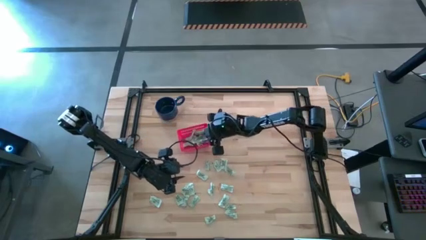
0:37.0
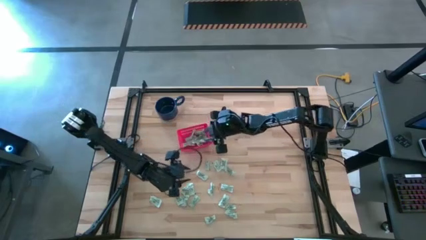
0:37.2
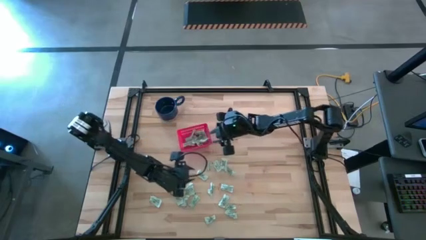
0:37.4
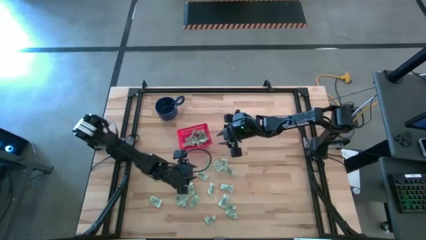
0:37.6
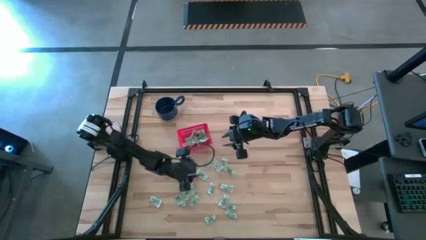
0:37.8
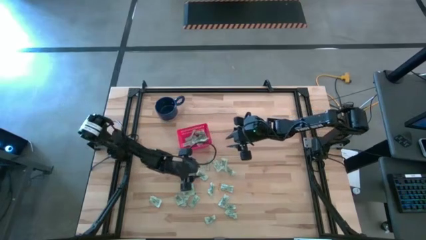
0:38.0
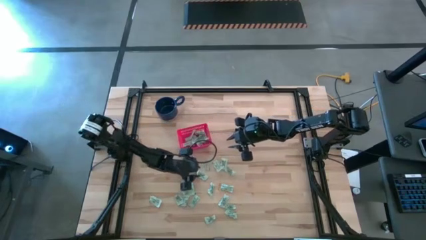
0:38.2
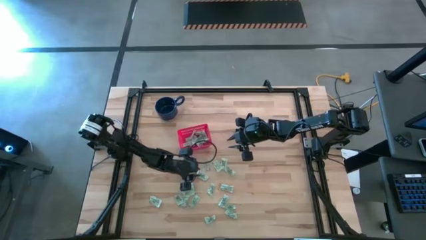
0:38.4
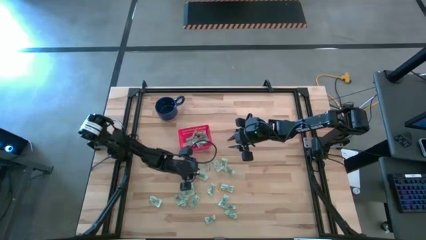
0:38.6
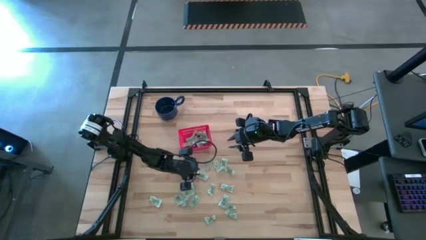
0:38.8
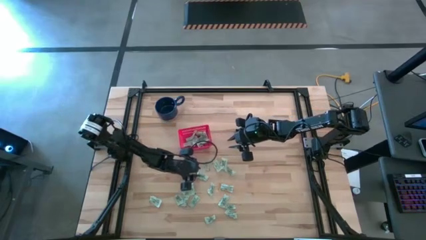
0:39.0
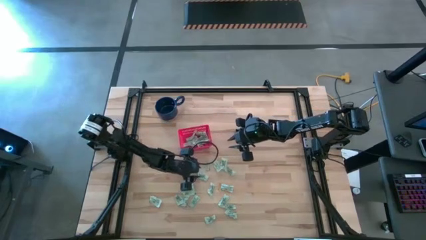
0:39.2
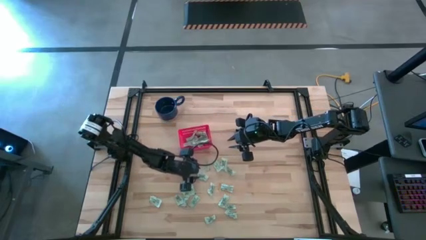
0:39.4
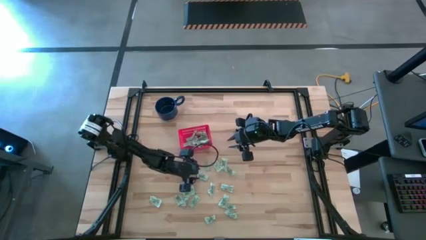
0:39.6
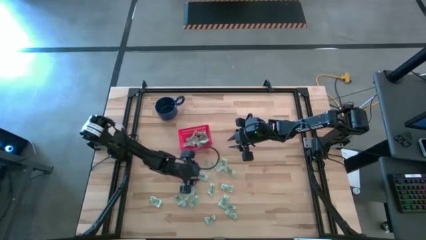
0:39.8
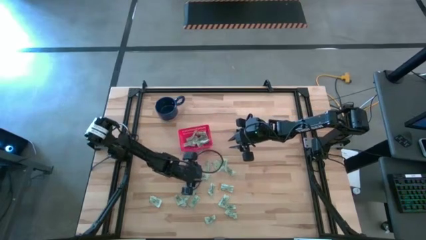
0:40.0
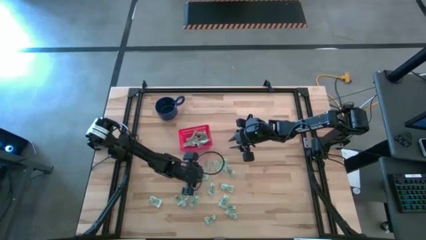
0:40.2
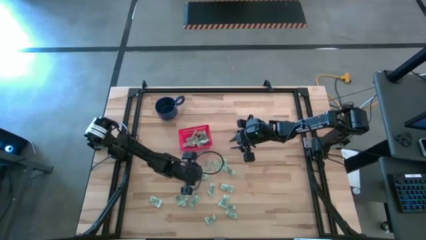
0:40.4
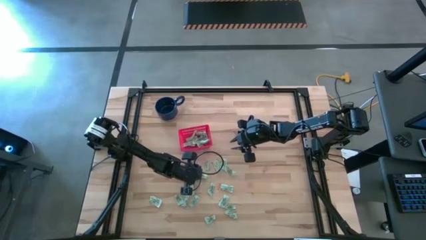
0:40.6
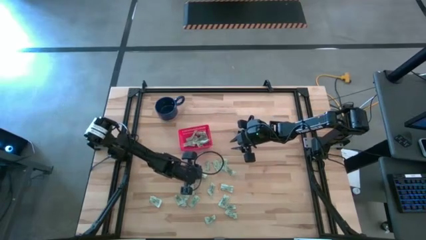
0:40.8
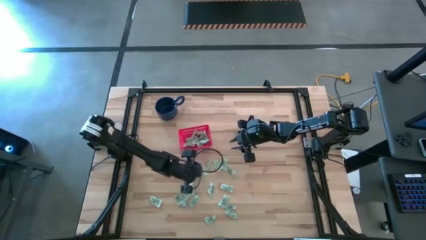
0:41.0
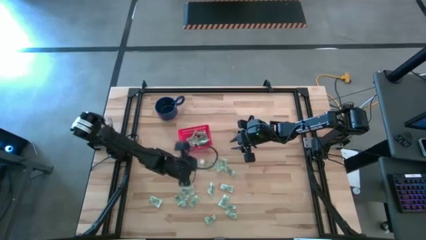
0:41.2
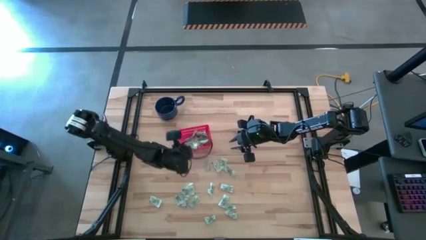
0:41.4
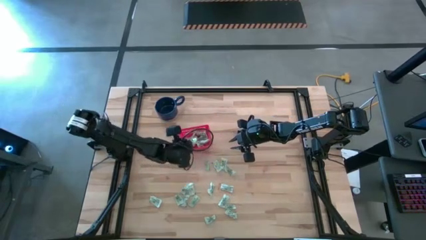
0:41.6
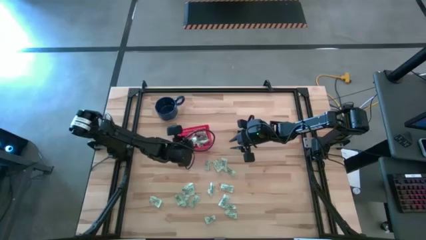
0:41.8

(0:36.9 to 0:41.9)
Task: Pick and place items into bin
Put the green stevia packet into the red bin

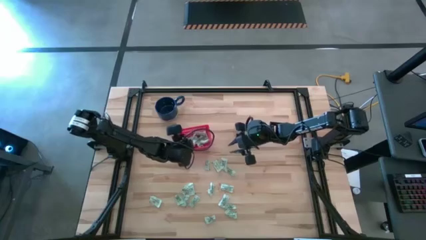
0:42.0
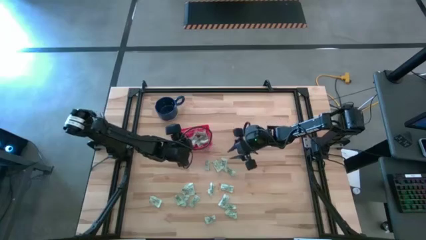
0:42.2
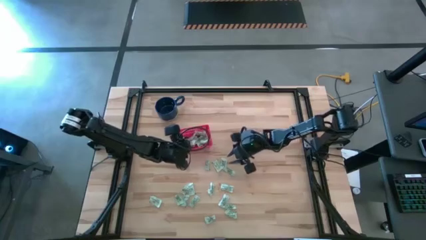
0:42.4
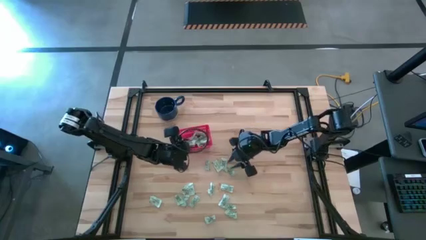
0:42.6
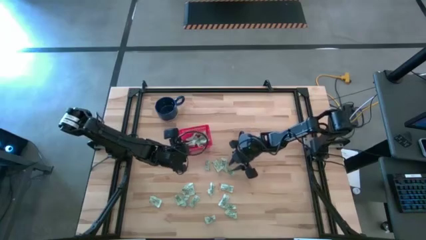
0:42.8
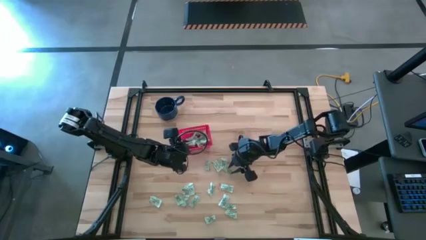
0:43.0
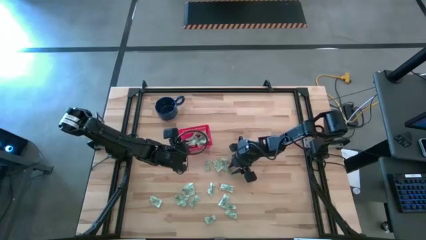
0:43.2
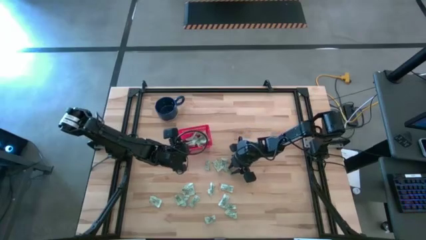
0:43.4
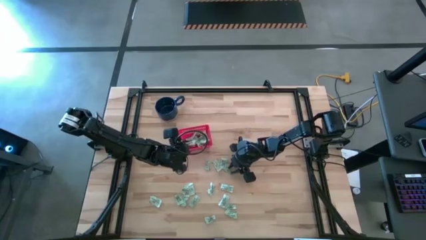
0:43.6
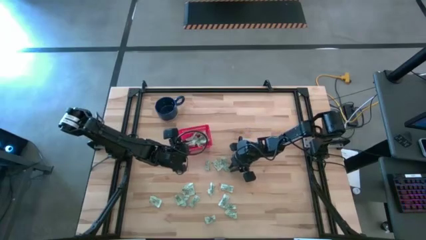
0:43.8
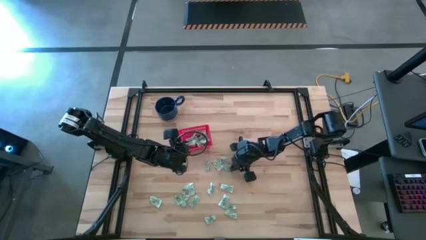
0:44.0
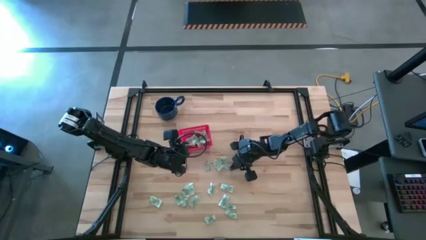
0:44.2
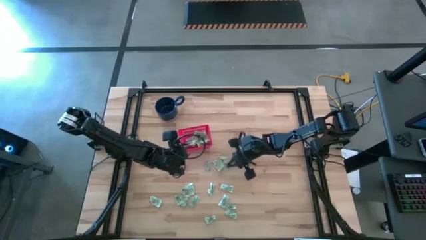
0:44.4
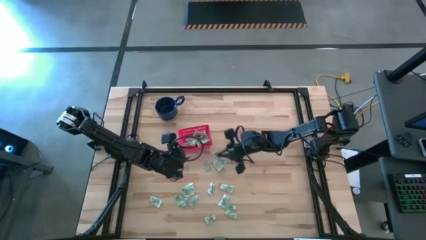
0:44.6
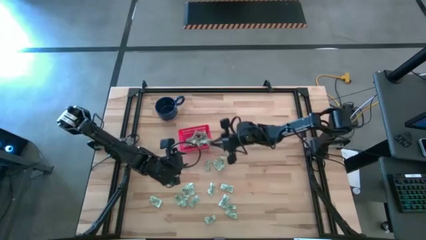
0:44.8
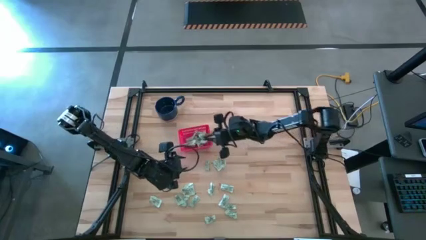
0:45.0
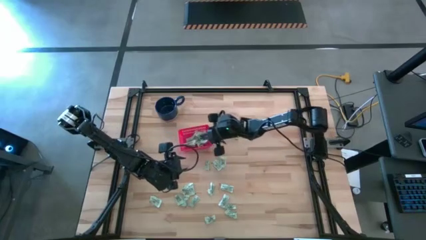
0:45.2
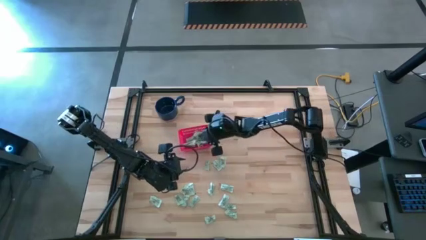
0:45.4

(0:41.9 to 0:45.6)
Put the green stevia packet into the red bin

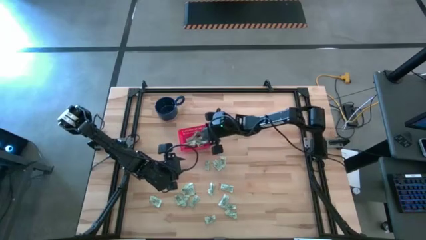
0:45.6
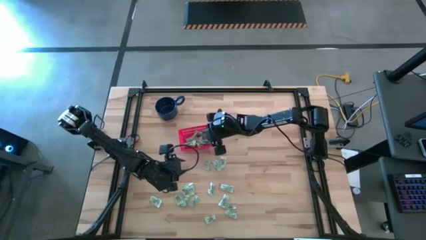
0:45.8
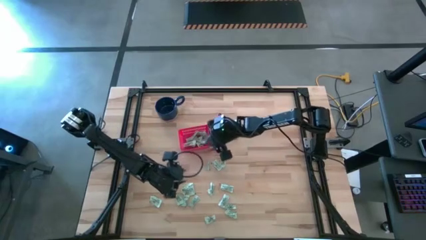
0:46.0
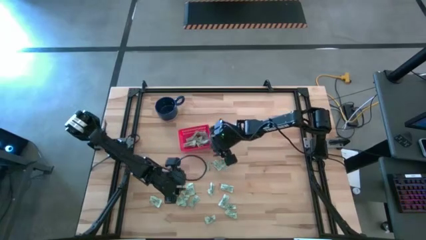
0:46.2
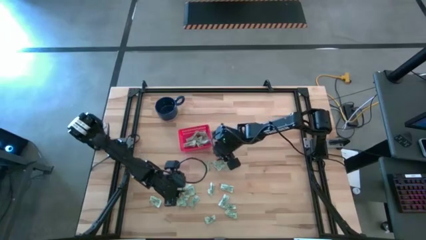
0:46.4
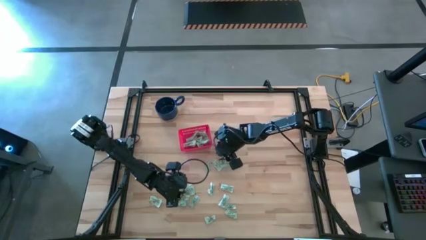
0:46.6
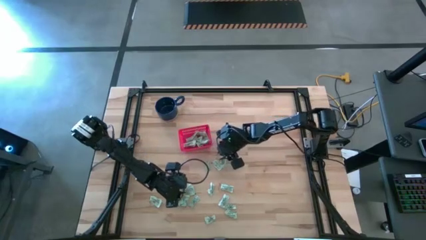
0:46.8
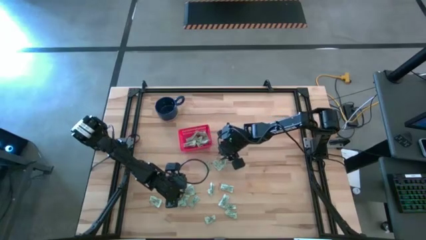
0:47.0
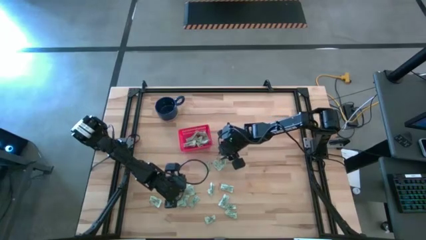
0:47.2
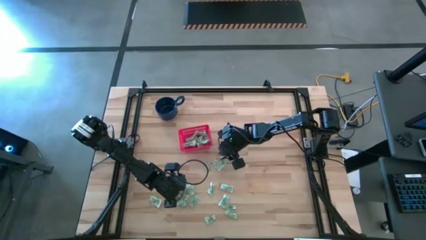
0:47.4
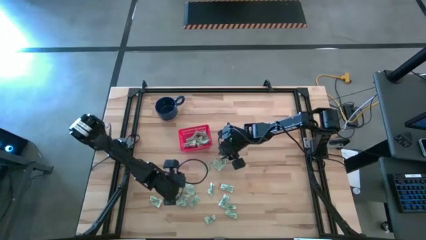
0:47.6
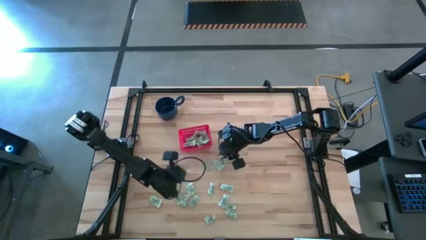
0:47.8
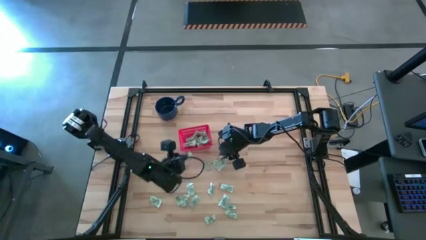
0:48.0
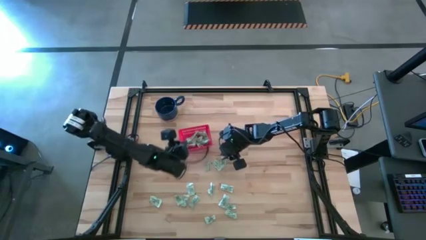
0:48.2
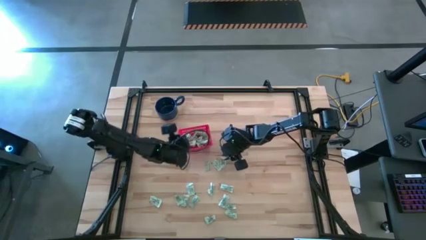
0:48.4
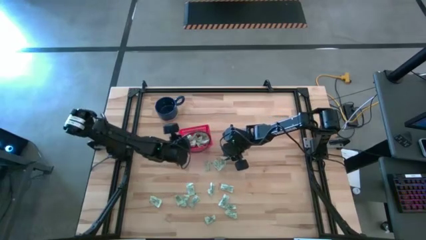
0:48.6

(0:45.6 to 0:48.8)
Put the green stevia packet into the red bin

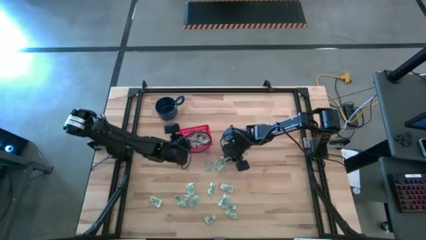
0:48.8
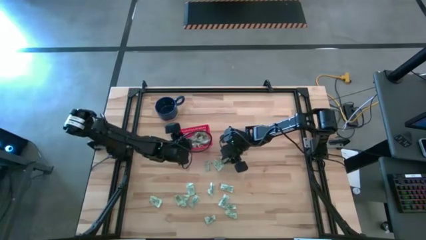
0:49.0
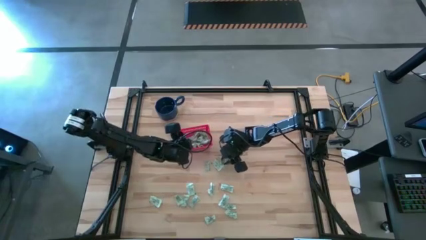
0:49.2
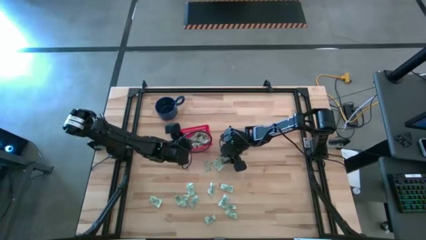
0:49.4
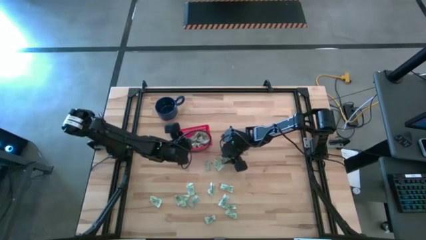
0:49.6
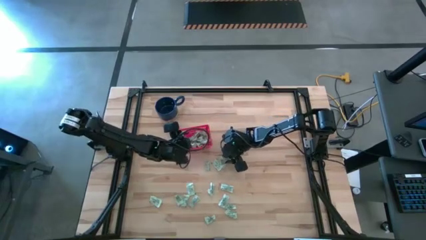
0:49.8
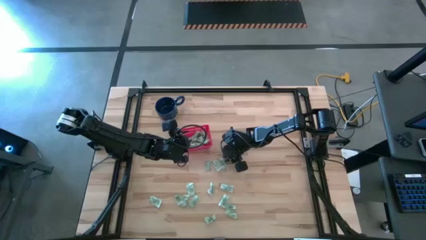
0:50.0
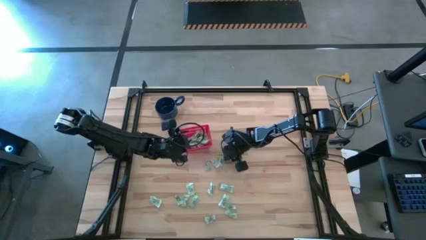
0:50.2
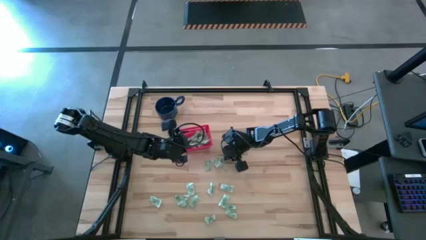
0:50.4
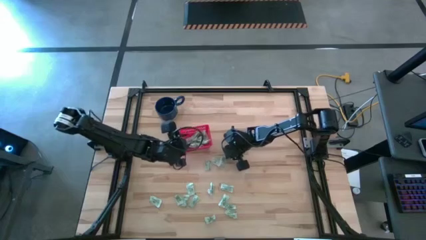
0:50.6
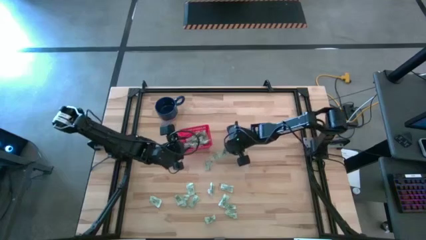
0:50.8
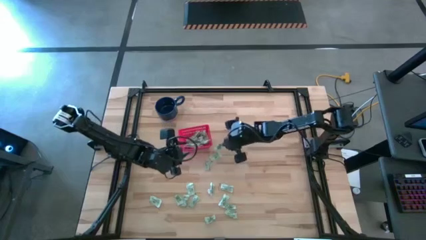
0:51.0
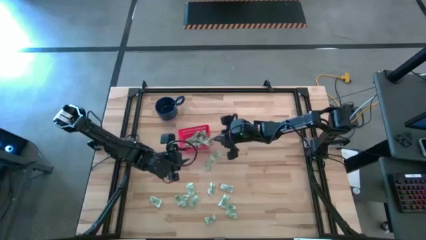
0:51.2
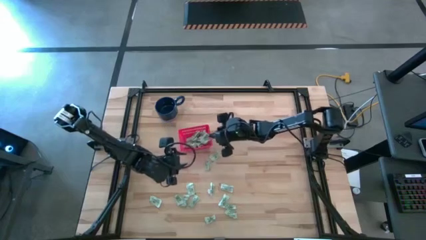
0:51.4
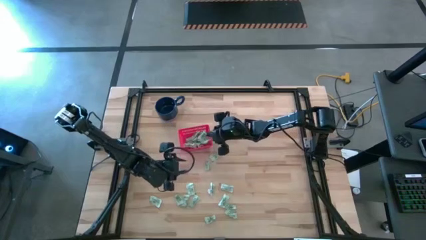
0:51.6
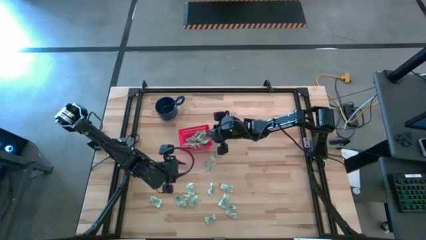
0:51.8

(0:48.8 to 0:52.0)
Put the green stevia packet into the red bin

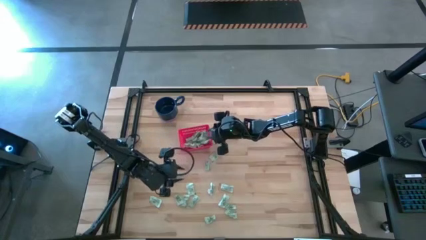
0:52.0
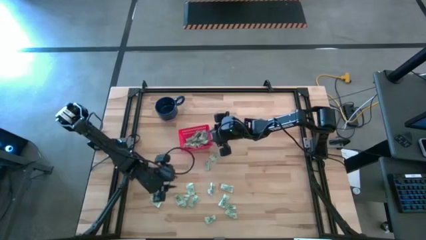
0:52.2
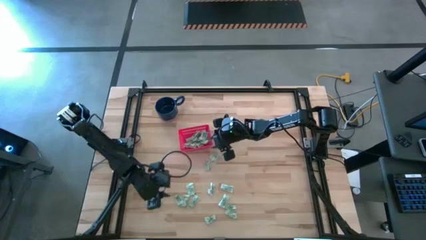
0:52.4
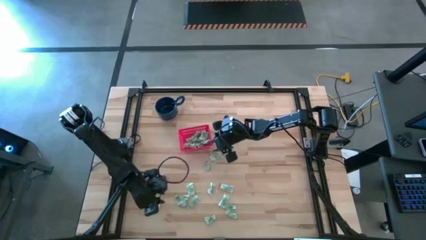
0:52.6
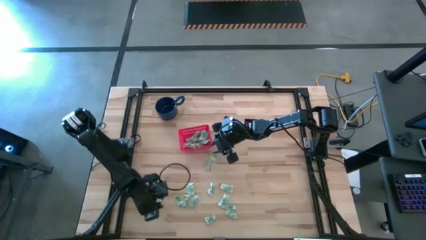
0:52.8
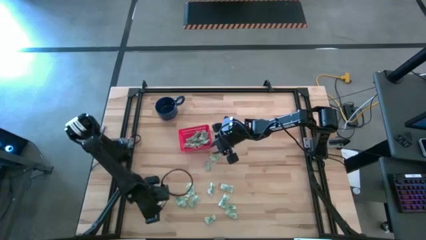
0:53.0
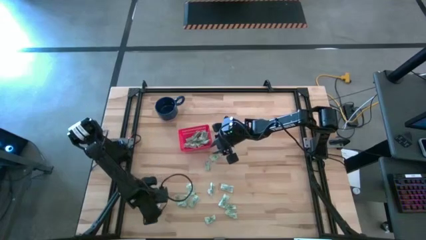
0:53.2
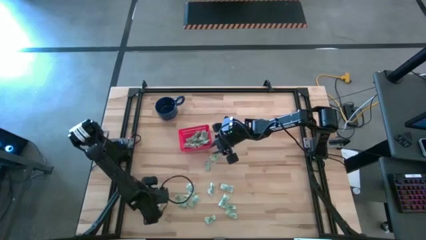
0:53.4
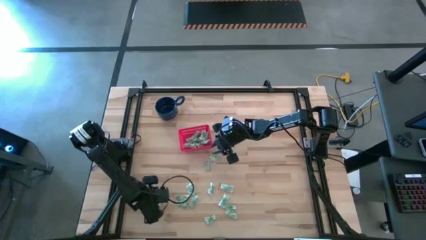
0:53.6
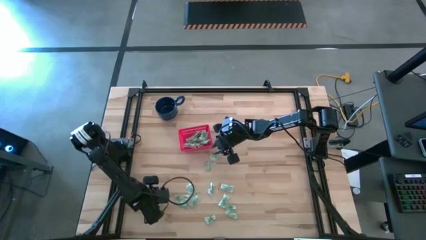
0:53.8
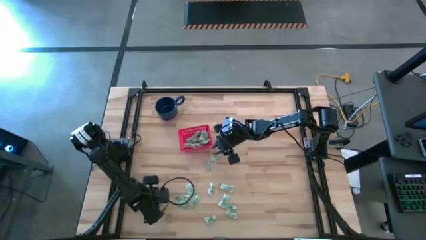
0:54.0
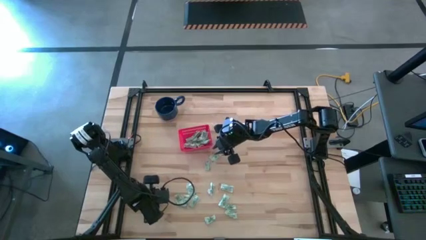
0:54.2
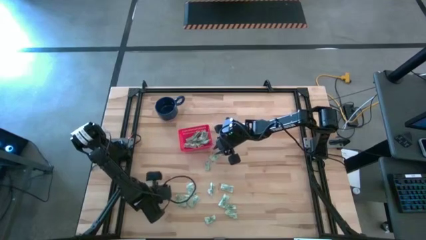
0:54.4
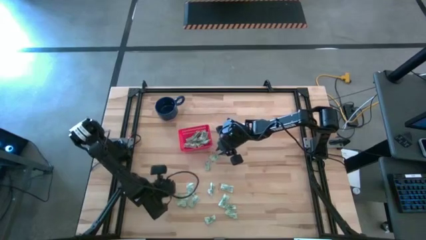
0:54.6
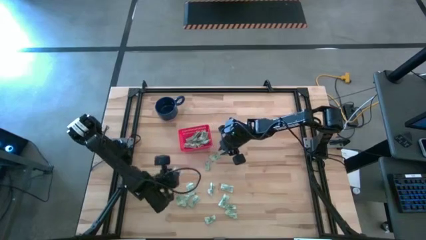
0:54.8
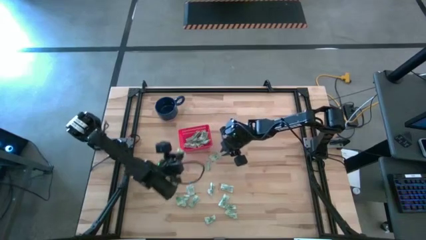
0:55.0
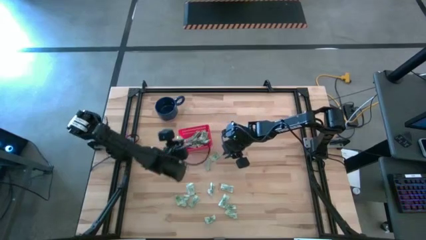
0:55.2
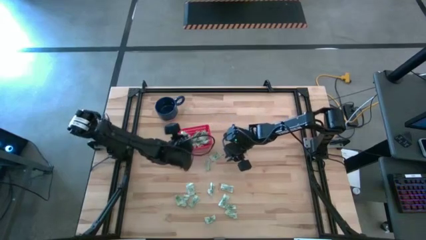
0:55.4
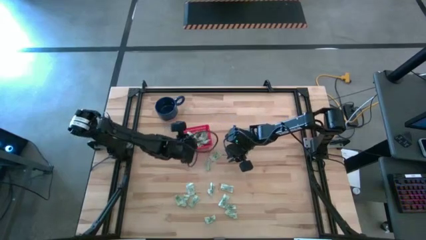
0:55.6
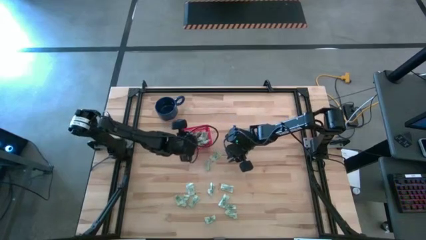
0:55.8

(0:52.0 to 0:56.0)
Put the green stevia packet into the red bin
